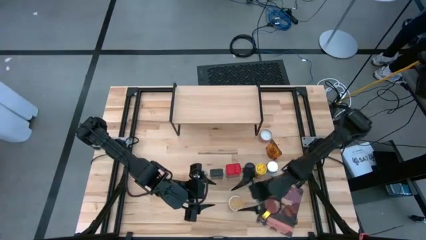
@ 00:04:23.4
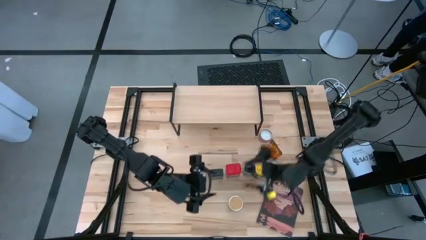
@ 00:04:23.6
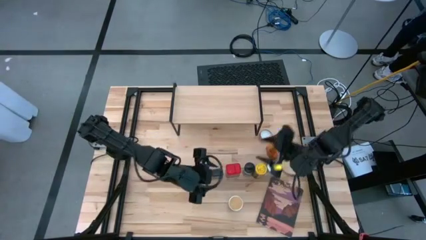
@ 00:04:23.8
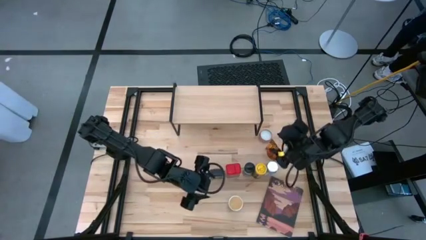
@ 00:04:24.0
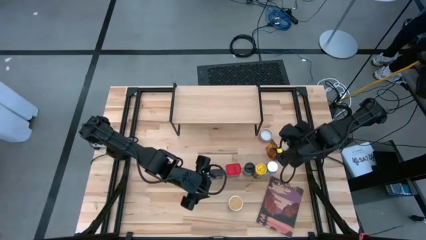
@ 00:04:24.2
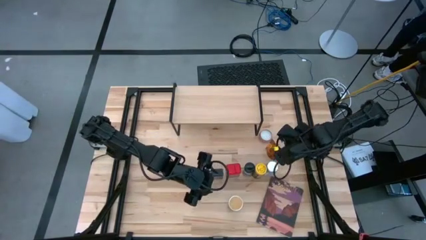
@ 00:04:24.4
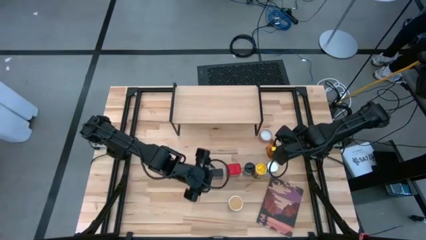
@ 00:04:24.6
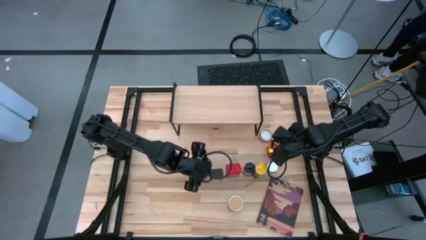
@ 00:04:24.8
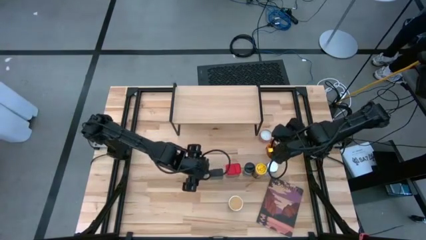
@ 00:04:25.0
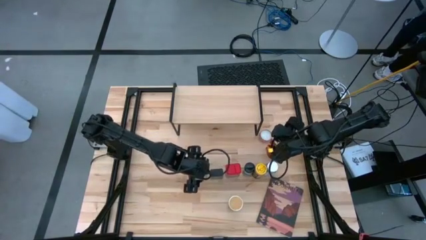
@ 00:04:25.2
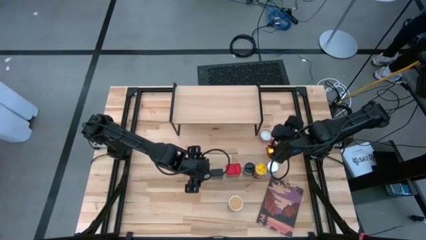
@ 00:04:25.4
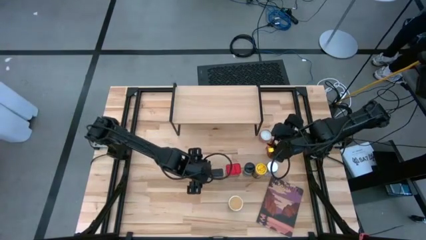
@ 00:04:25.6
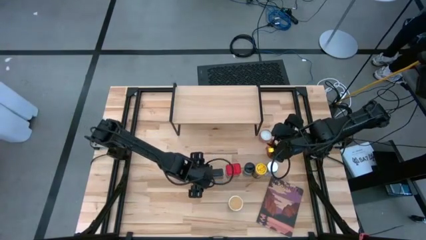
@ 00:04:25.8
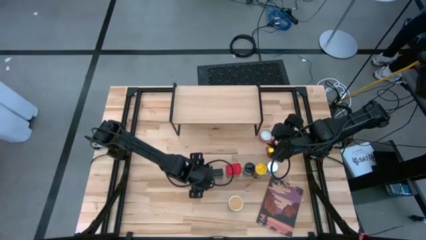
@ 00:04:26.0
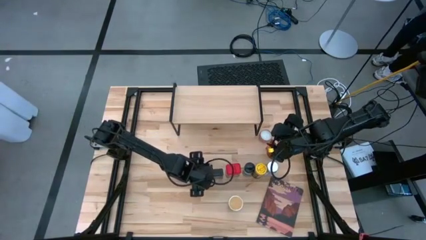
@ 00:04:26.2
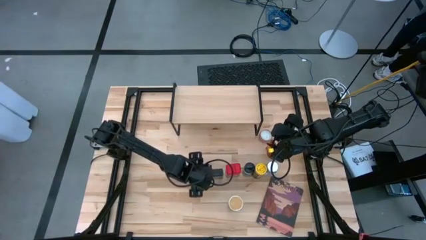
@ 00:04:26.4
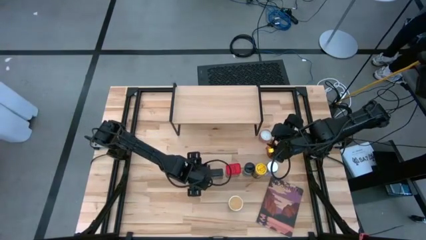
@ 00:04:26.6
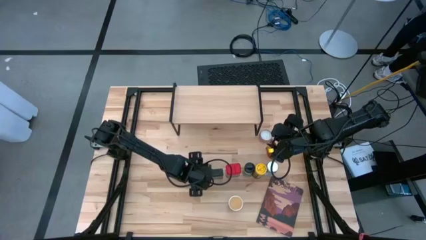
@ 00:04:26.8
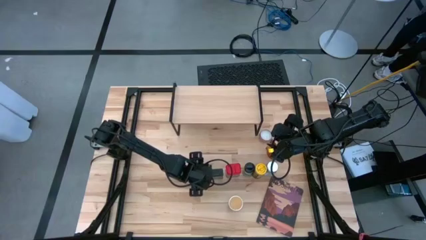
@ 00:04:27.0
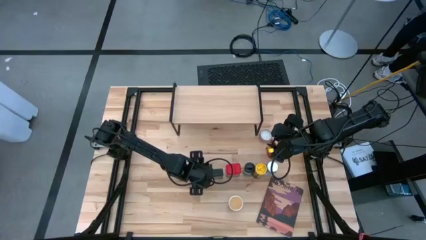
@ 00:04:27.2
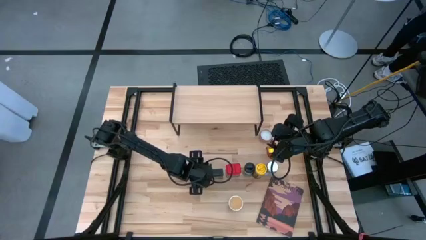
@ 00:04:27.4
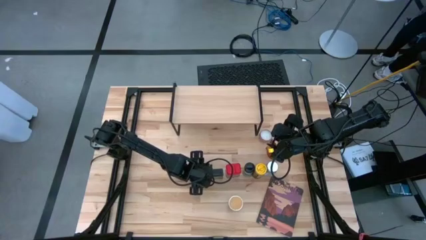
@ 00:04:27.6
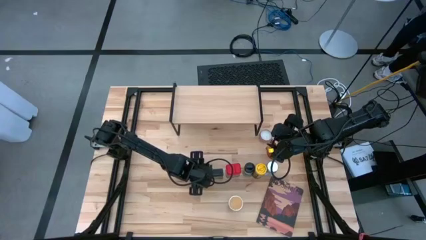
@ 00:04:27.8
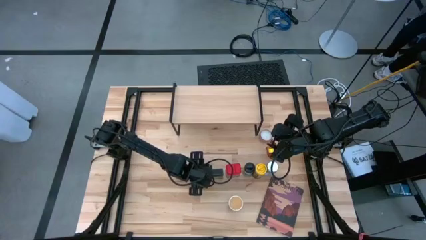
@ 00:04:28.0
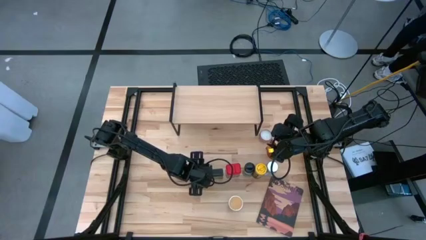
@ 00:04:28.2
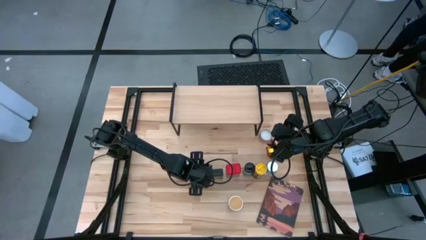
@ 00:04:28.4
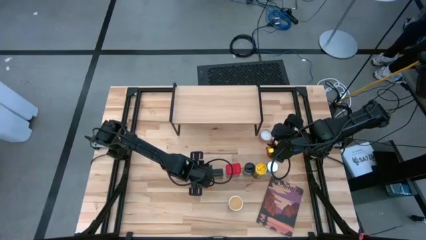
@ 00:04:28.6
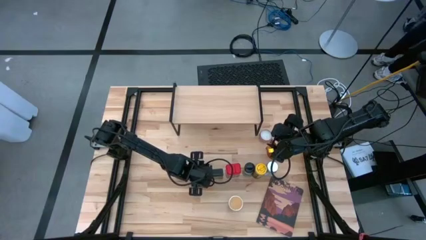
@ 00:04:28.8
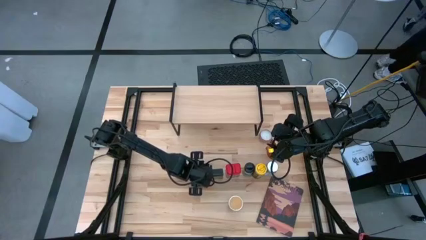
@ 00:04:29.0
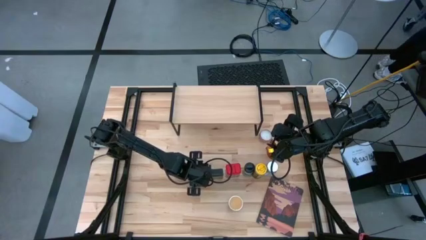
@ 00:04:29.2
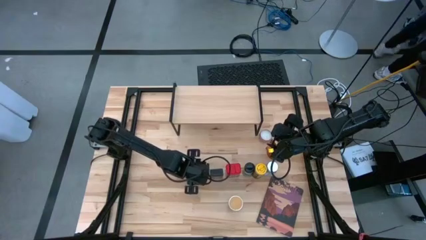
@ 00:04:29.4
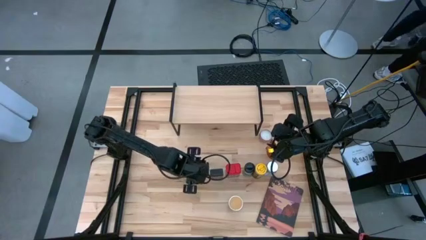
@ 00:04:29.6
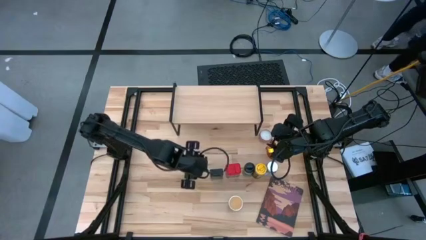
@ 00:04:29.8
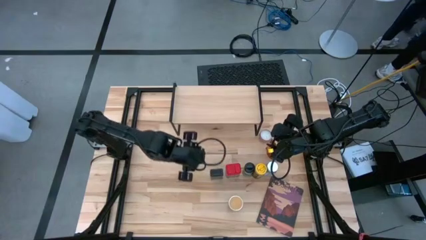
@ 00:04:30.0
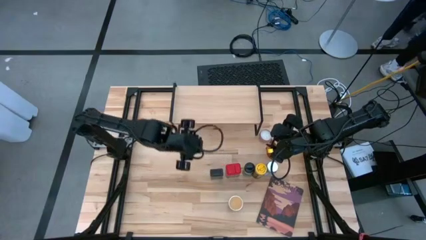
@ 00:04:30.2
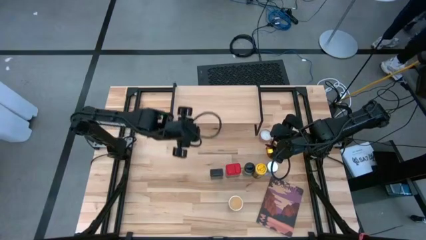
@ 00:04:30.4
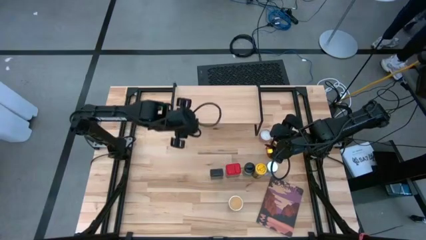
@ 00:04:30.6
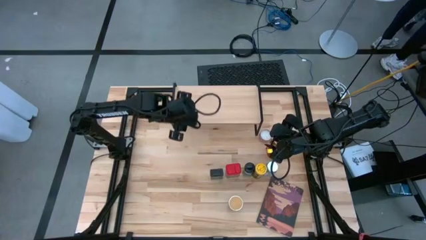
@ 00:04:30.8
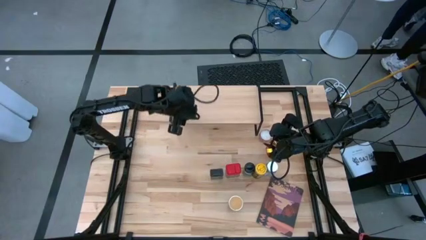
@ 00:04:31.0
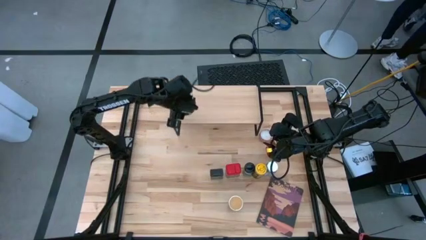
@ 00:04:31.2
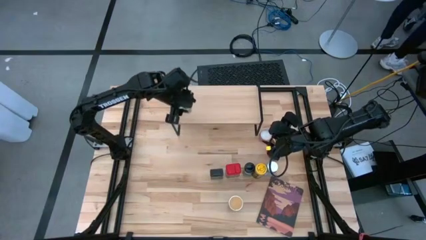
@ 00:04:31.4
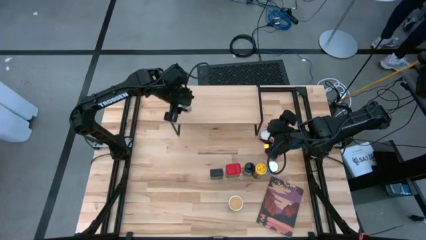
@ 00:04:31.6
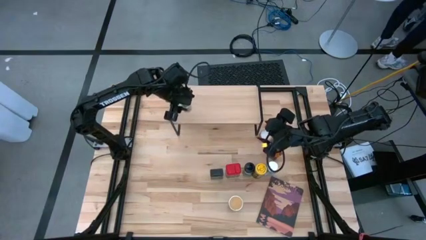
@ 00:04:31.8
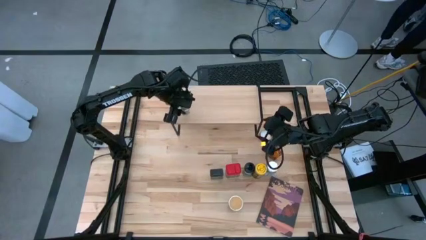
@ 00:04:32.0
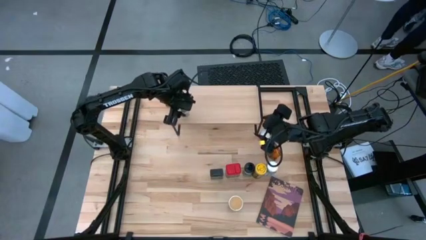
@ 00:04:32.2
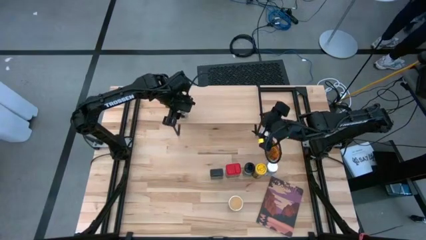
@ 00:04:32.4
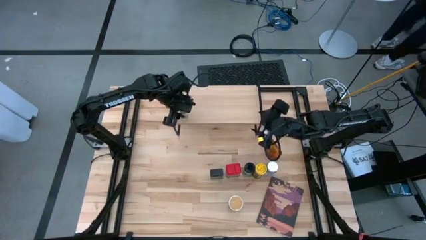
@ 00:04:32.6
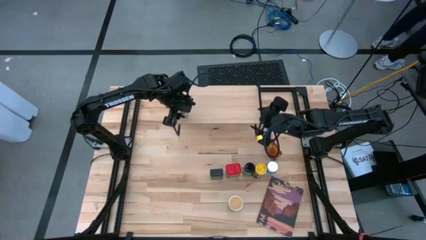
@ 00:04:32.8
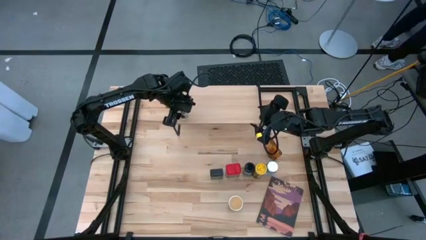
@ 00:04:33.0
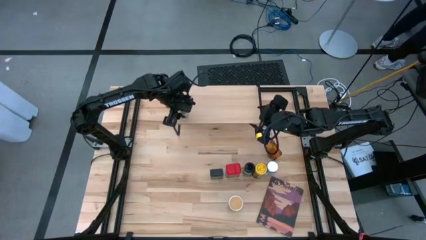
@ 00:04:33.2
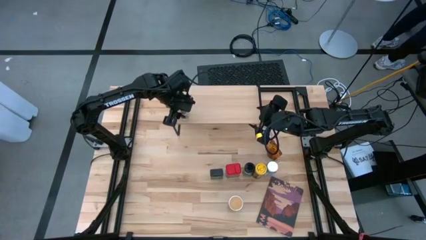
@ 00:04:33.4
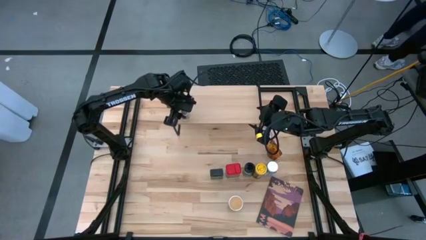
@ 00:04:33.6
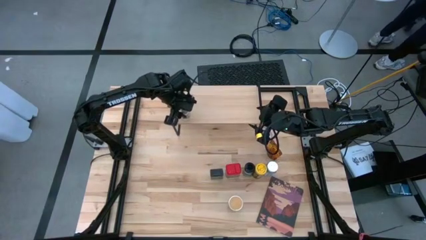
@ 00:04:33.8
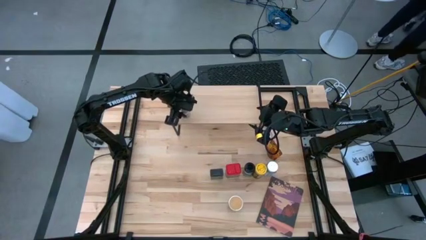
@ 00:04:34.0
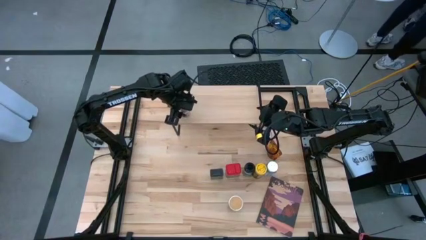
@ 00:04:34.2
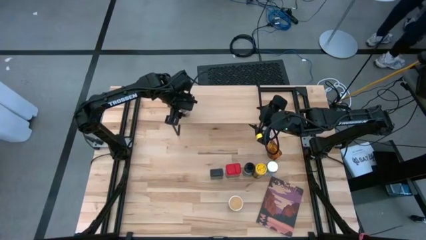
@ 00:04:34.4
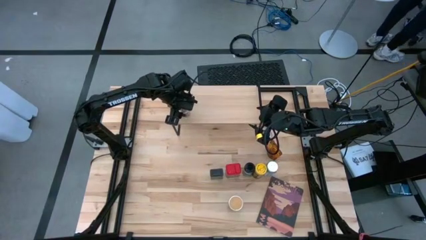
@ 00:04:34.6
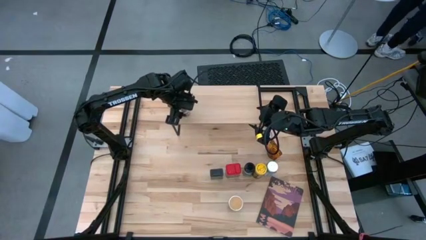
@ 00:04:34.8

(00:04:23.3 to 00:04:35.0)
Task: Shelf spices
Put the transparent spice bottle on of the shelf

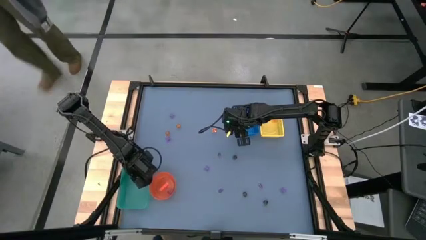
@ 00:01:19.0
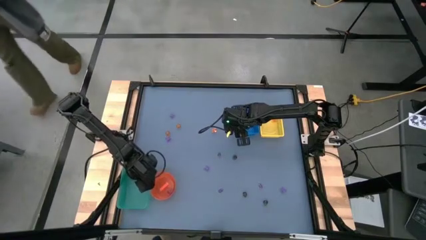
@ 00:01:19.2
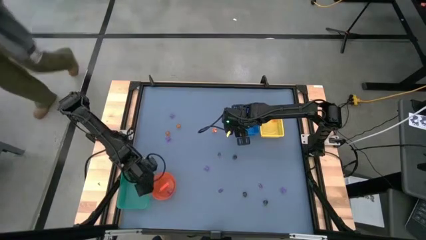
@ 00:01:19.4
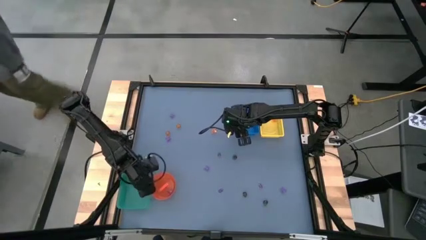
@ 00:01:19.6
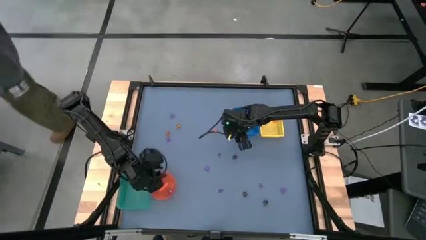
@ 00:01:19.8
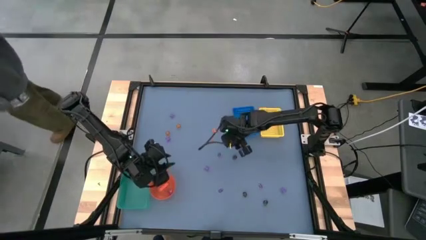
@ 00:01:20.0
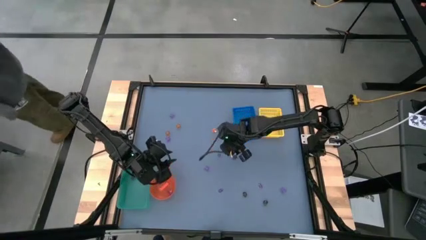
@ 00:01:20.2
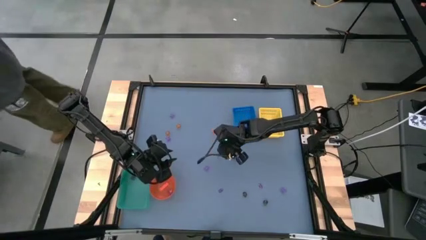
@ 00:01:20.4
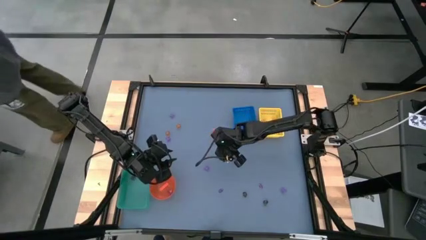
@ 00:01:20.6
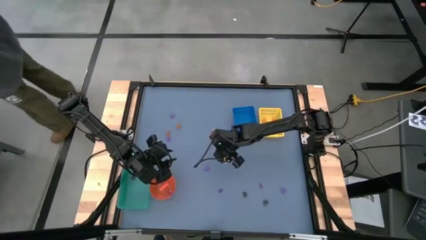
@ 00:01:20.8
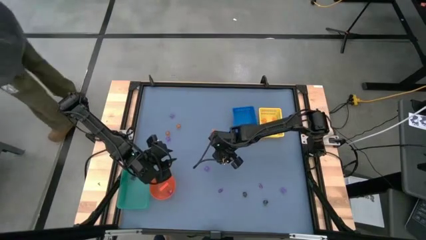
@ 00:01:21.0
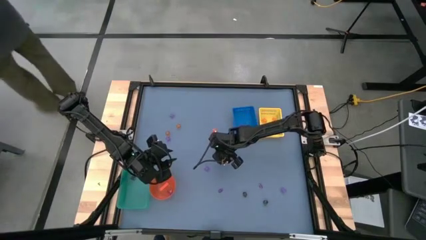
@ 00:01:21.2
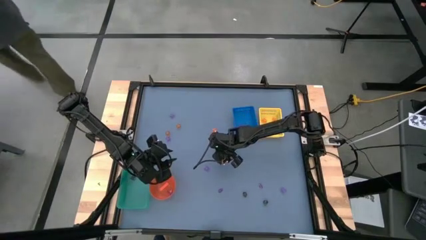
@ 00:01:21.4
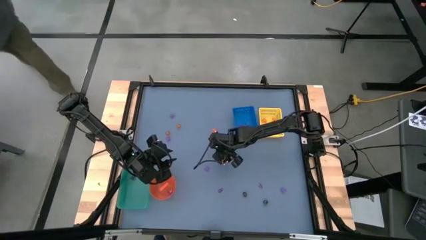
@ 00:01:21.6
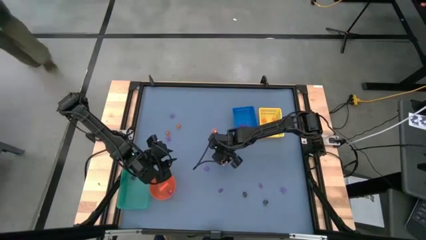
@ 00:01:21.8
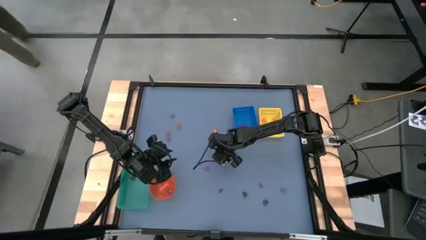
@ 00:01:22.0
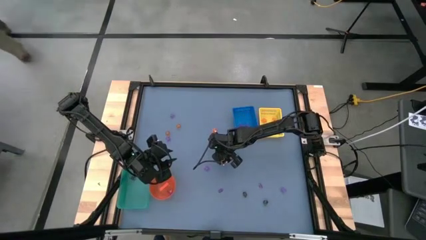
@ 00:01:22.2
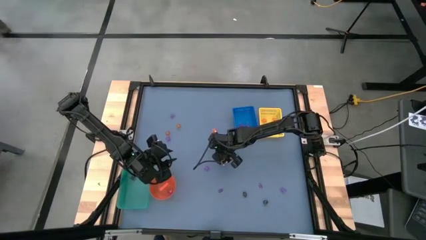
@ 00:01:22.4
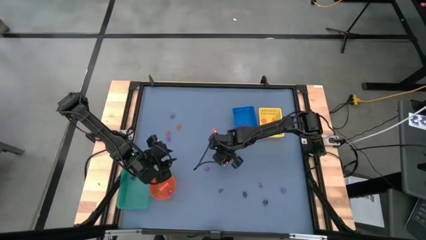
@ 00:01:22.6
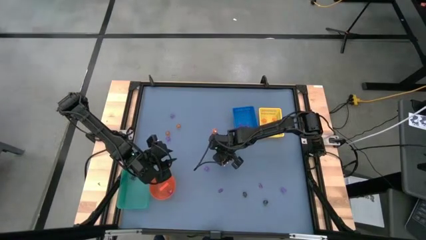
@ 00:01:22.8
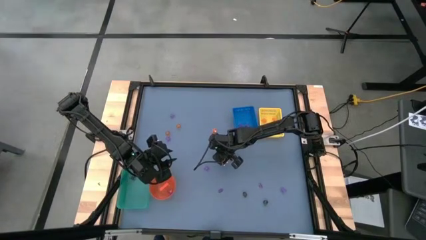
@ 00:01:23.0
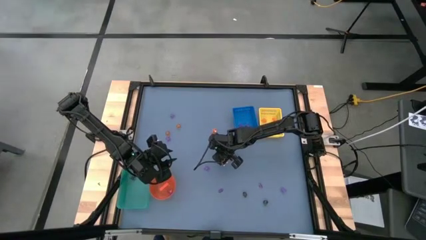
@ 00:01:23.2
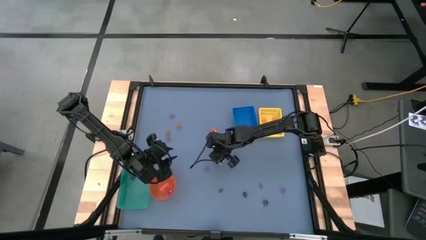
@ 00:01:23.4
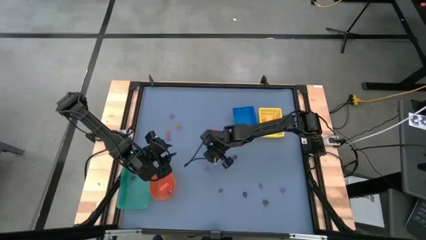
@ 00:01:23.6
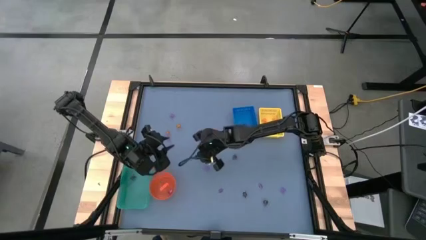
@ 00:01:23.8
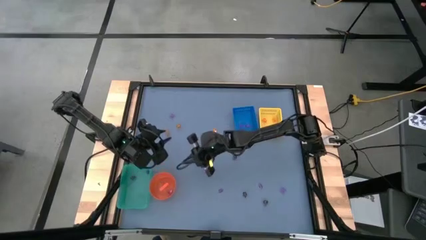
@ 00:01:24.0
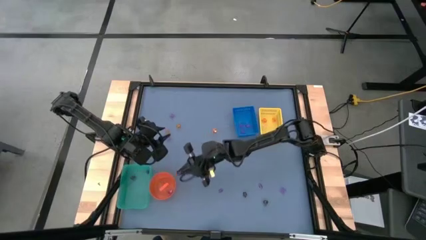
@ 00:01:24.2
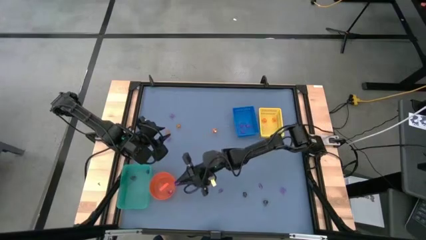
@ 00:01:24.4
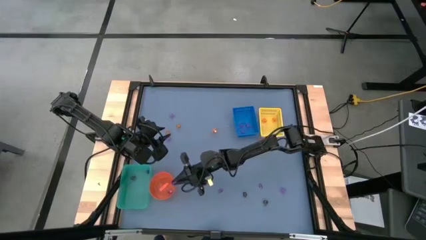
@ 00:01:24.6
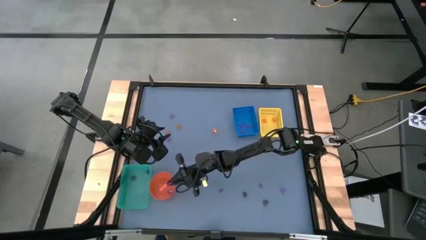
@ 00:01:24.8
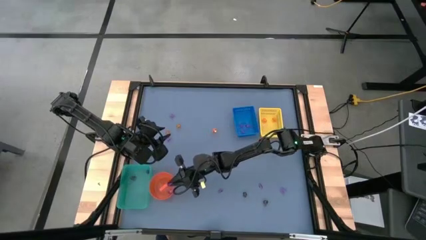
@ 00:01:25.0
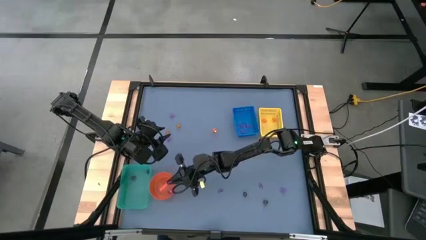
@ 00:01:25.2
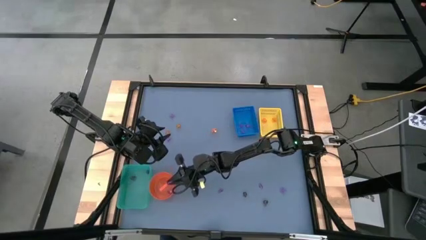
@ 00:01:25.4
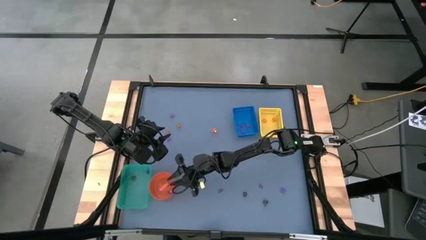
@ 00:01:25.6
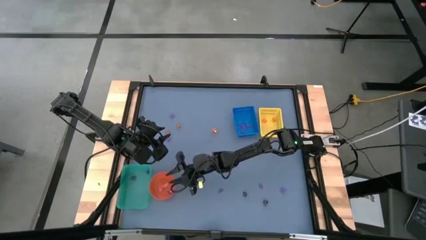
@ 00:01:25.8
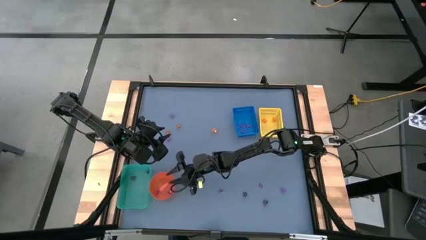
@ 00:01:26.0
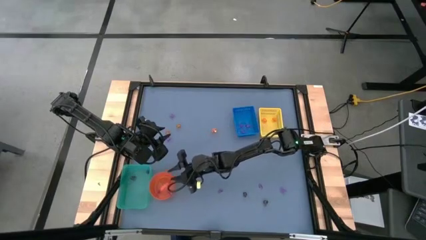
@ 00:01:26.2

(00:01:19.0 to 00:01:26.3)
Task: Sort Halloween decoration
Put the violet witch hat toy into the orange bin
